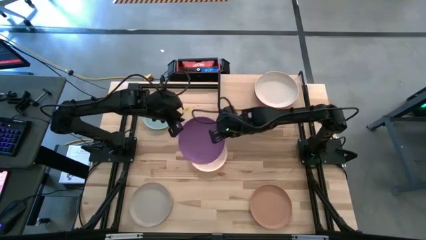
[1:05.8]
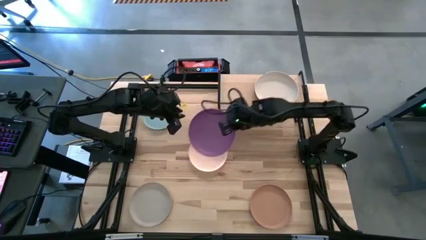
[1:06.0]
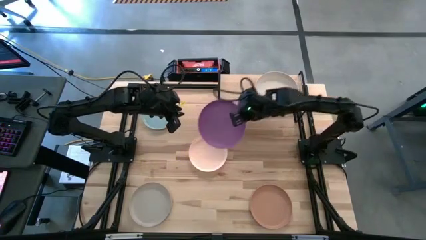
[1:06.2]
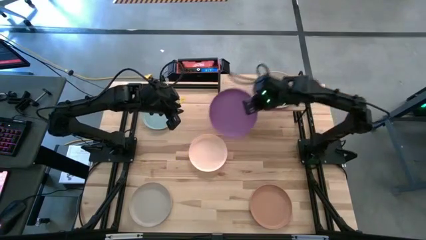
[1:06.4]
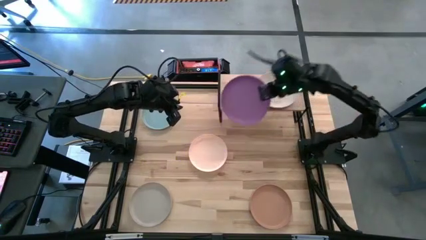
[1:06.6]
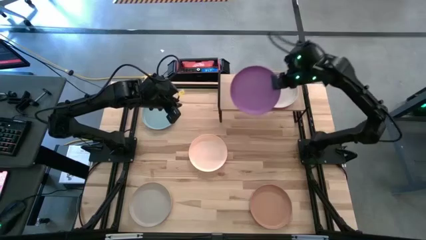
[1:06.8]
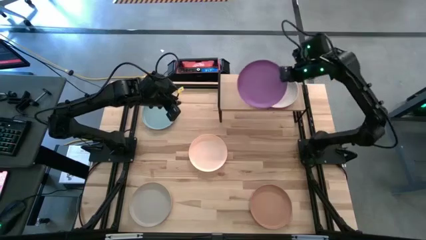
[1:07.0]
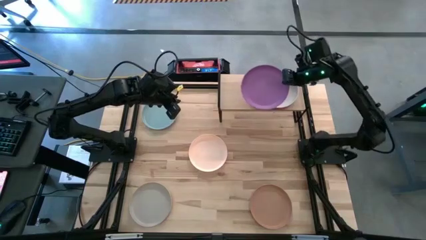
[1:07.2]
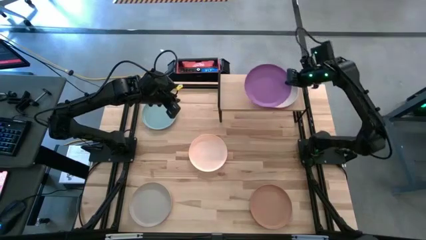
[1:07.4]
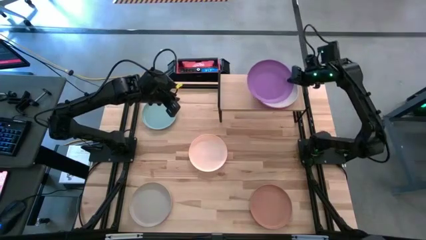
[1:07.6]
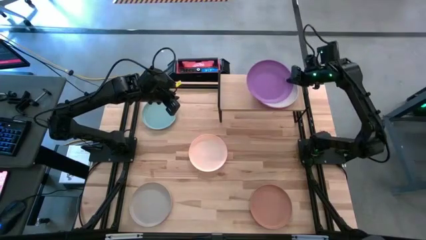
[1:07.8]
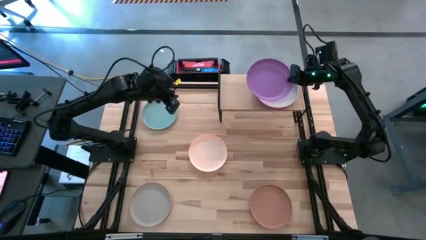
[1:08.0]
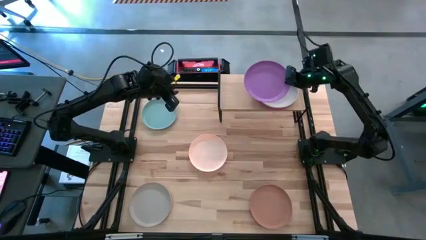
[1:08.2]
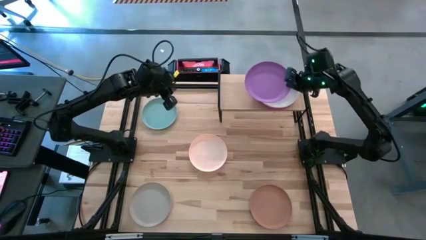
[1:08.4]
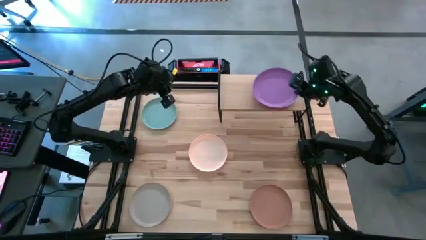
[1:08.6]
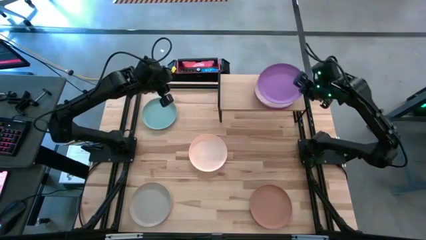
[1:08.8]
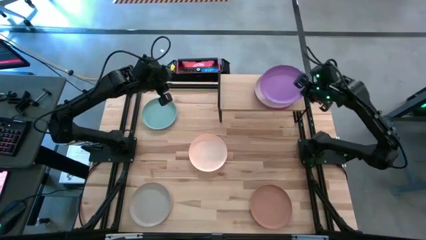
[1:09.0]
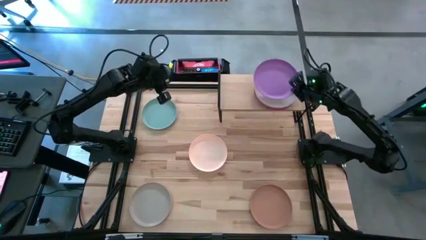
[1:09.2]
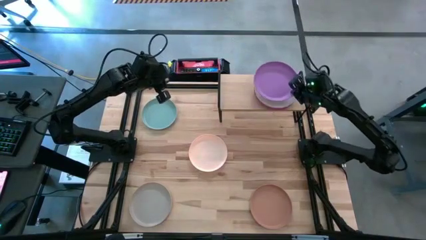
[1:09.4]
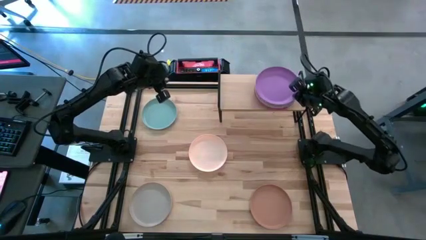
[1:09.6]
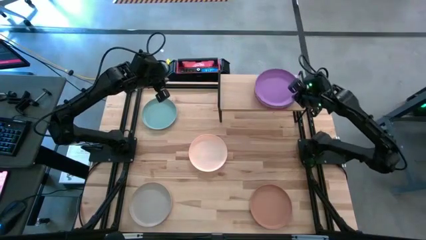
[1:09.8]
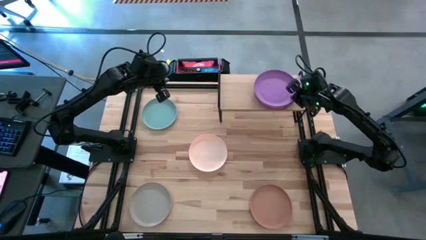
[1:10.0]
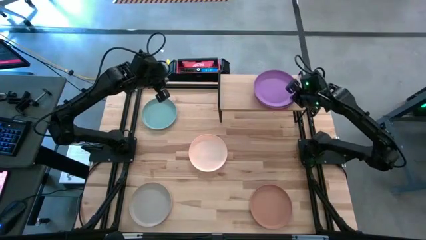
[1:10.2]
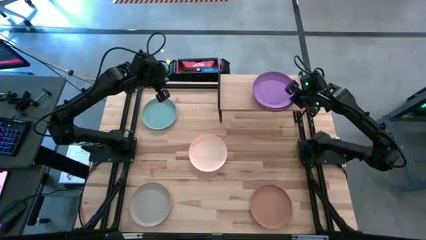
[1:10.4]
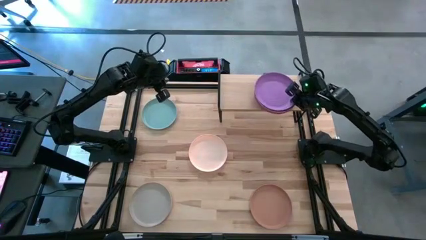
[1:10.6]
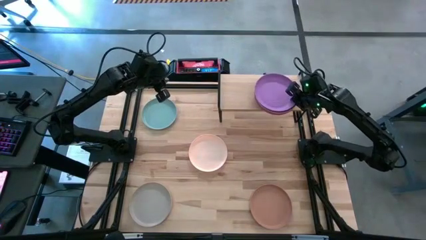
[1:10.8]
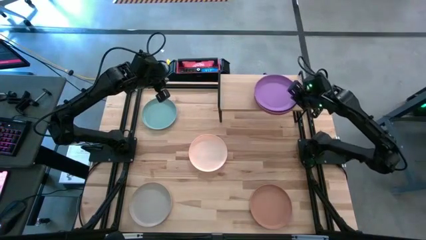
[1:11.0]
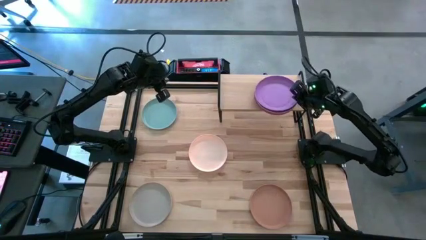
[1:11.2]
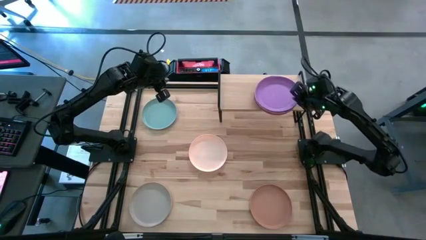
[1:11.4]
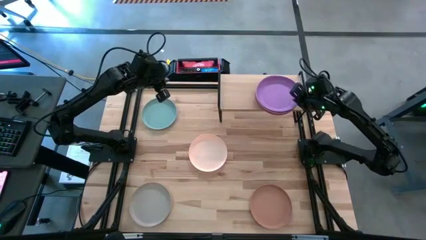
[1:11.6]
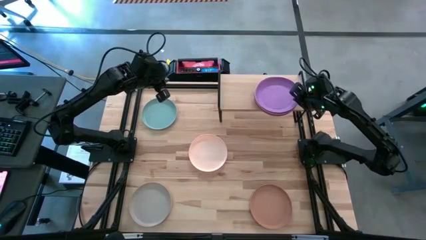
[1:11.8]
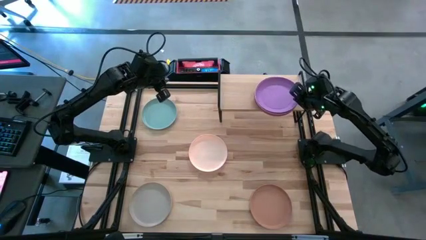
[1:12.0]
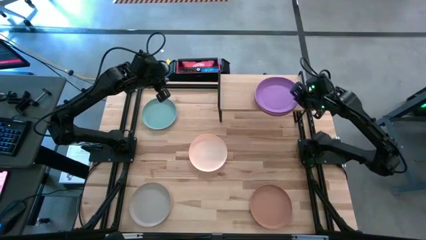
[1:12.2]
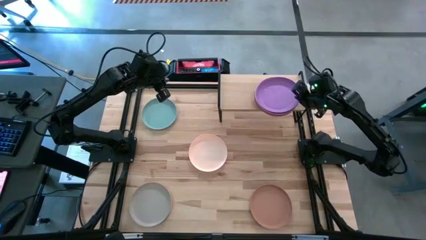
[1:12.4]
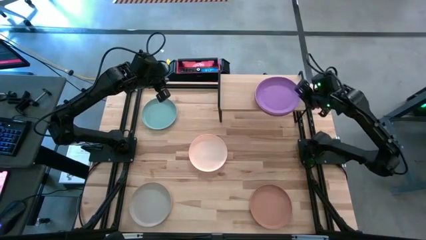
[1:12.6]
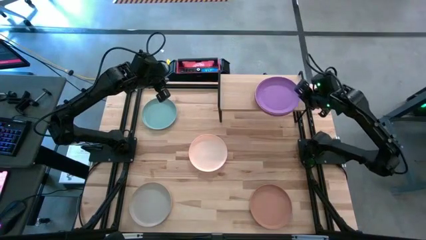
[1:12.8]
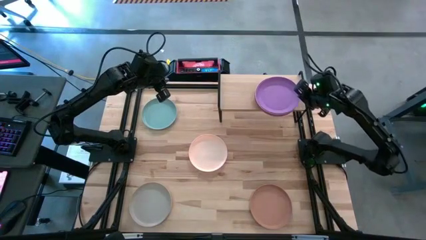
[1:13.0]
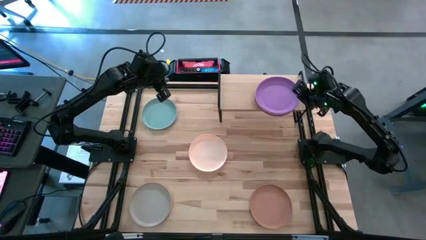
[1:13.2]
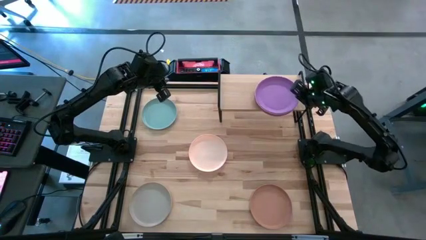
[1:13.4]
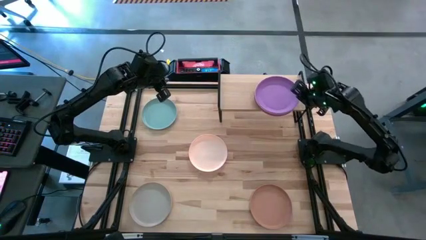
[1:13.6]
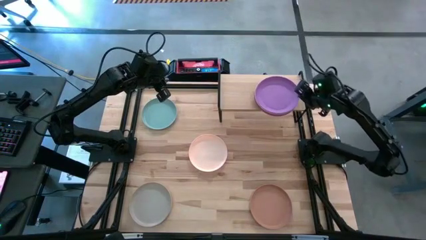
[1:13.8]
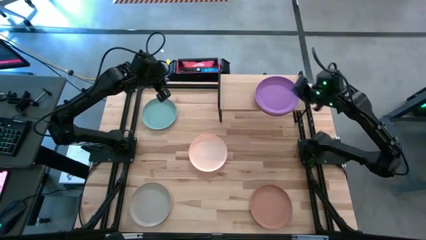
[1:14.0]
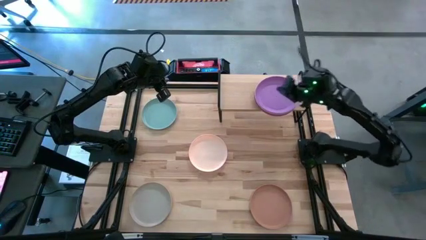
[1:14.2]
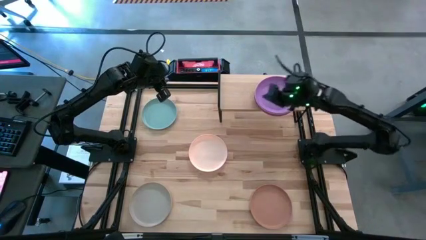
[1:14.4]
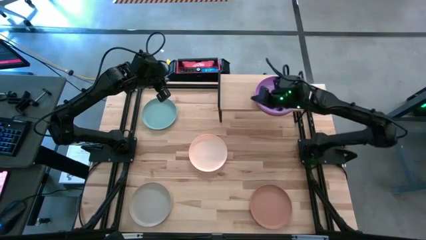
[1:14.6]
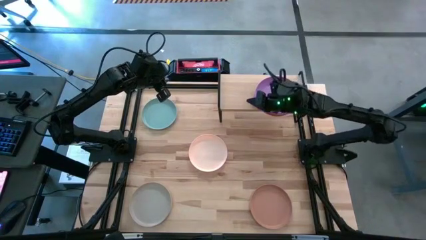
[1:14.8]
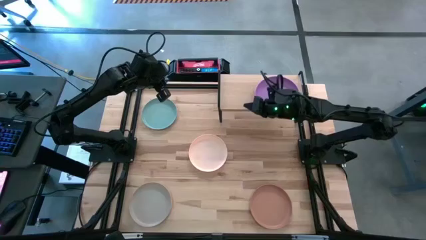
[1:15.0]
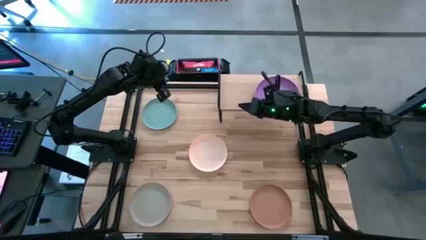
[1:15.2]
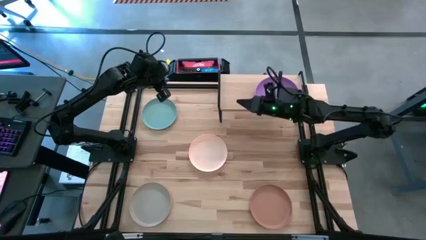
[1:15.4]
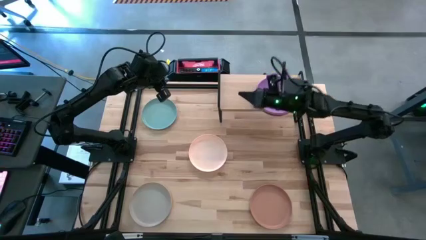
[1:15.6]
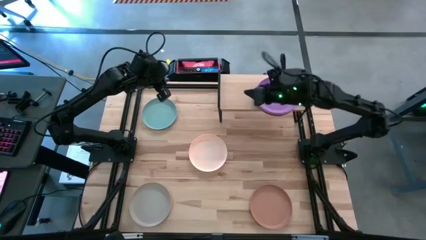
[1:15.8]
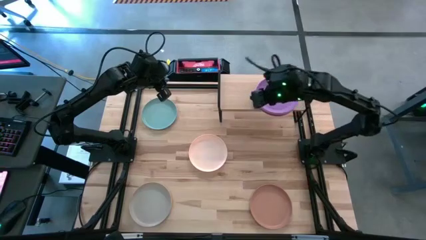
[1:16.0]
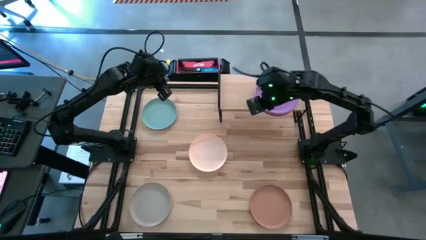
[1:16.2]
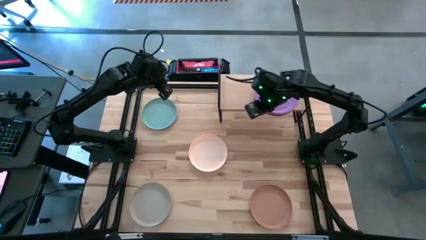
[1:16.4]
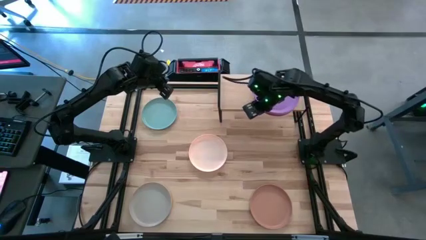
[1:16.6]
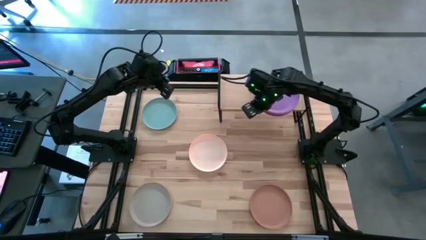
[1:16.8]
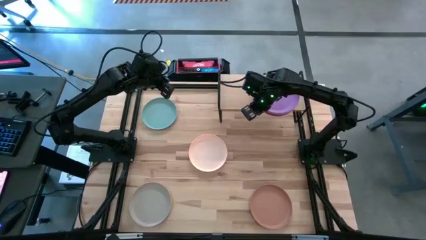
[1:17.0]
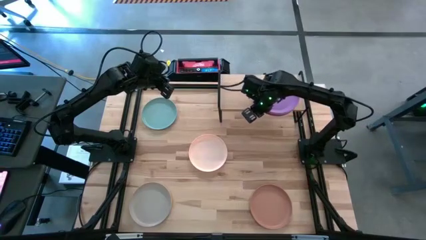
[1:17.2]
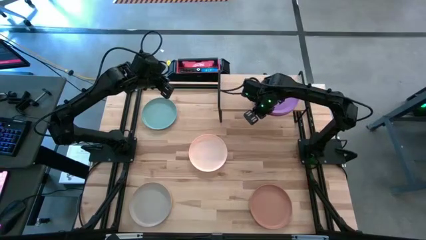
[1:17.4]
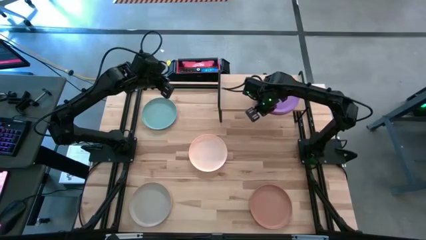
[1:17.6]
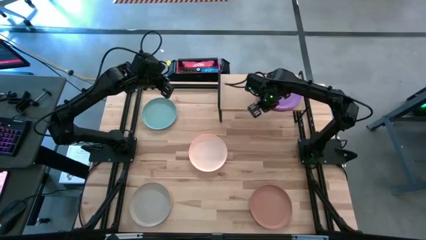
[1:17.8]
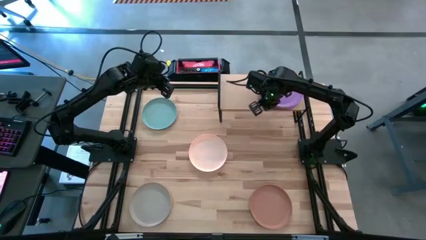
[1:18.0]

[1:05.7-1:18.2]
Task: Place and stack plates onto a shelf
Stack the purple plate on top of the white plate on the shelf
